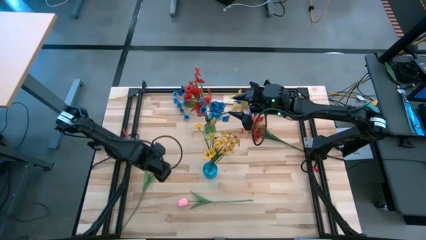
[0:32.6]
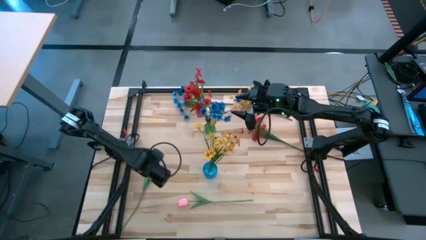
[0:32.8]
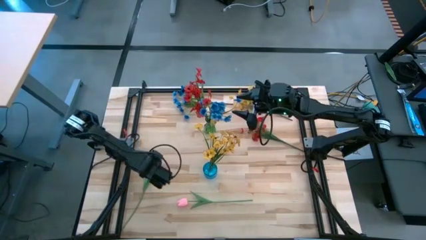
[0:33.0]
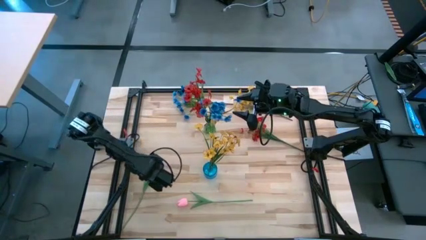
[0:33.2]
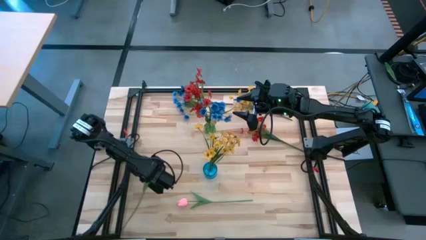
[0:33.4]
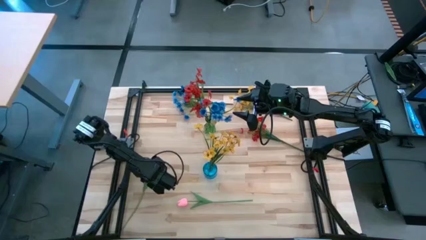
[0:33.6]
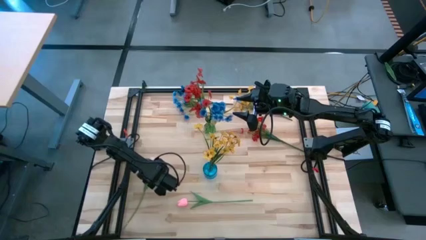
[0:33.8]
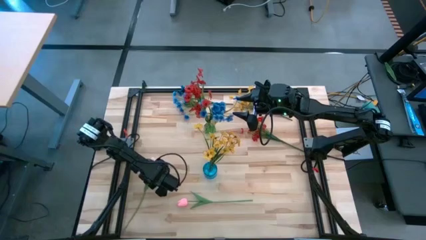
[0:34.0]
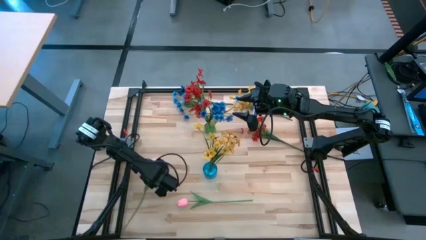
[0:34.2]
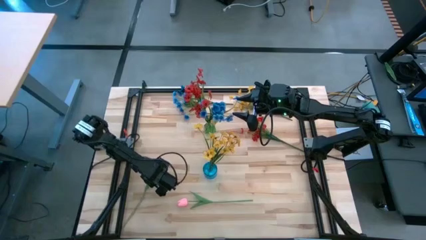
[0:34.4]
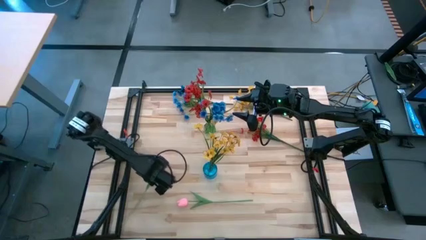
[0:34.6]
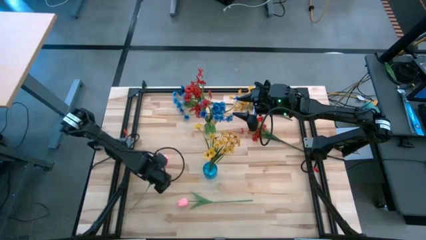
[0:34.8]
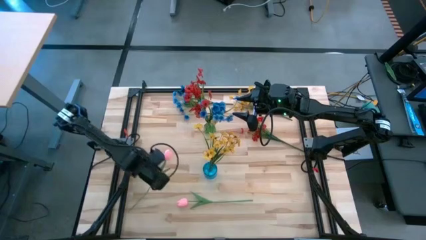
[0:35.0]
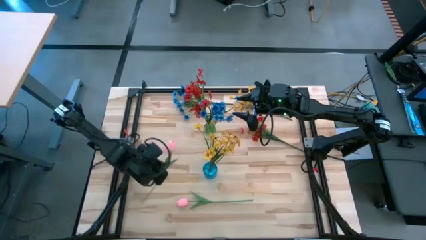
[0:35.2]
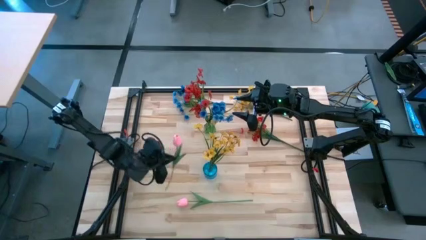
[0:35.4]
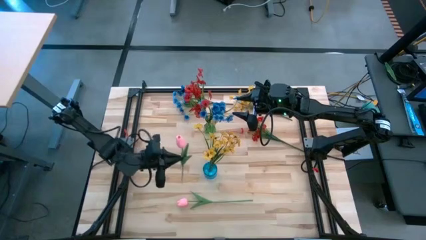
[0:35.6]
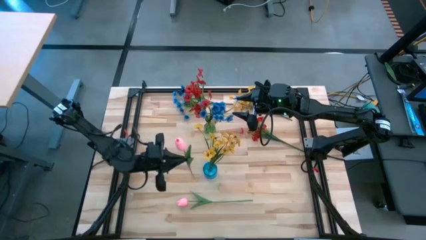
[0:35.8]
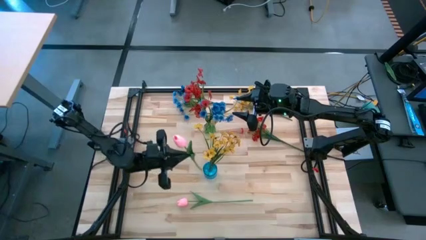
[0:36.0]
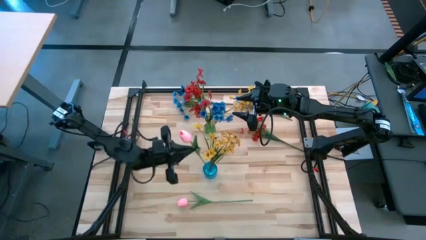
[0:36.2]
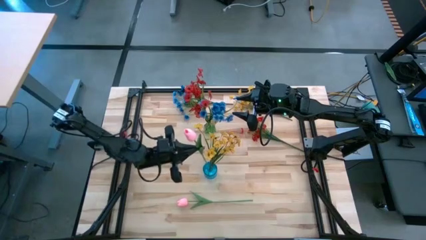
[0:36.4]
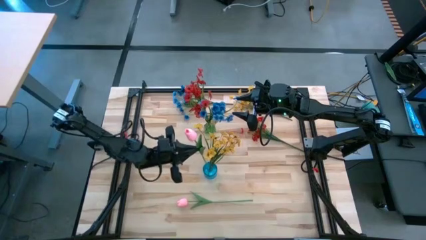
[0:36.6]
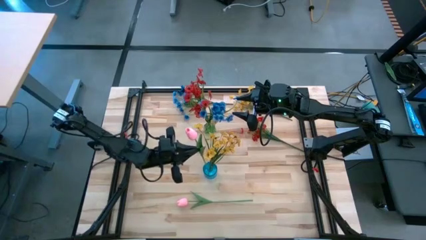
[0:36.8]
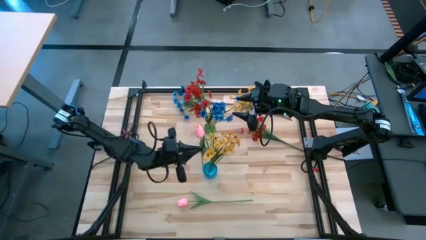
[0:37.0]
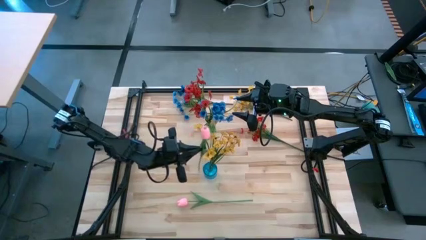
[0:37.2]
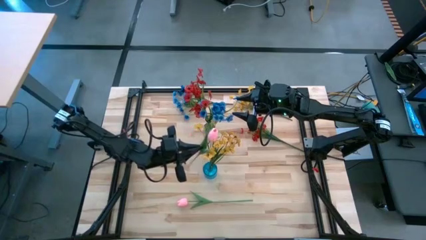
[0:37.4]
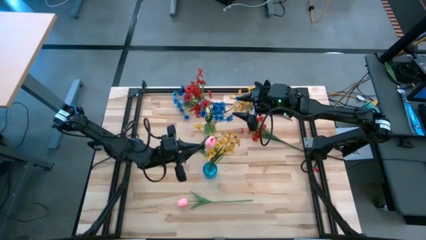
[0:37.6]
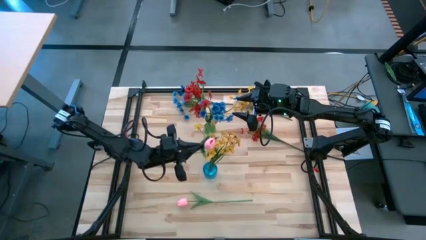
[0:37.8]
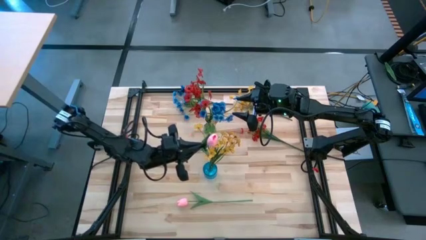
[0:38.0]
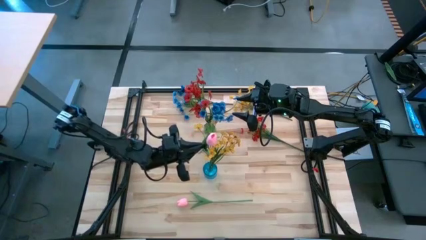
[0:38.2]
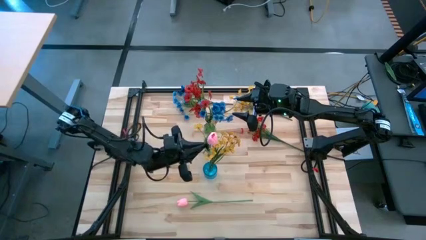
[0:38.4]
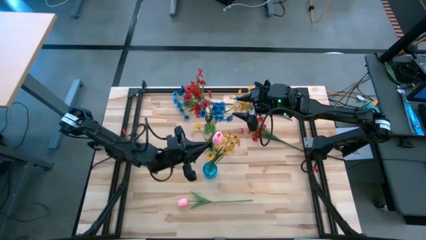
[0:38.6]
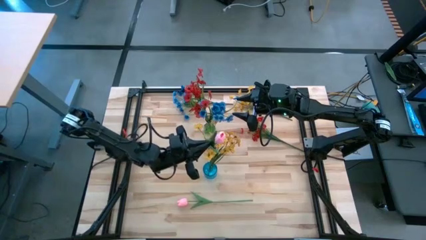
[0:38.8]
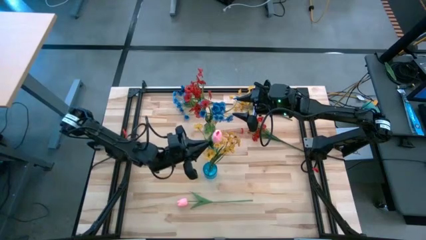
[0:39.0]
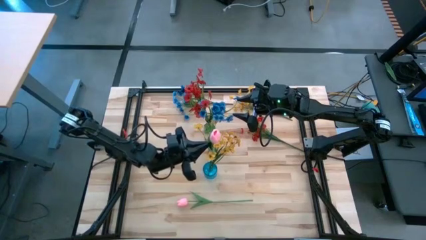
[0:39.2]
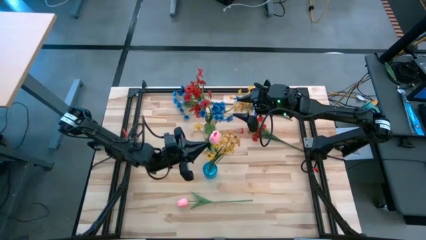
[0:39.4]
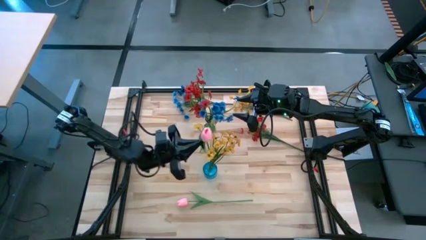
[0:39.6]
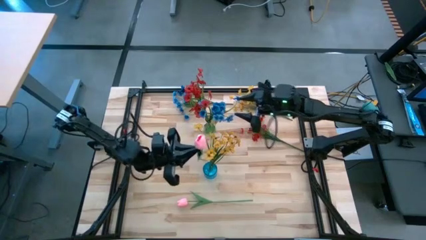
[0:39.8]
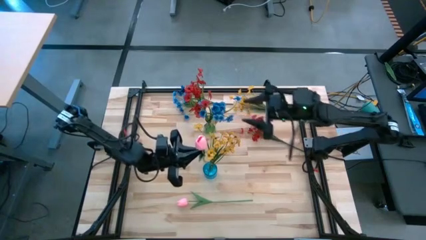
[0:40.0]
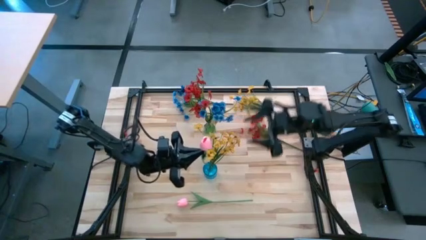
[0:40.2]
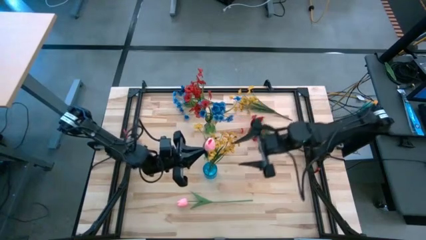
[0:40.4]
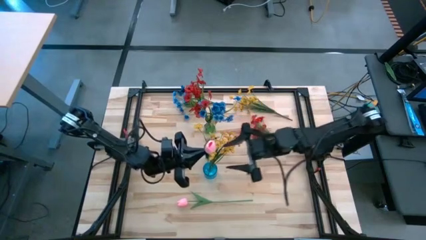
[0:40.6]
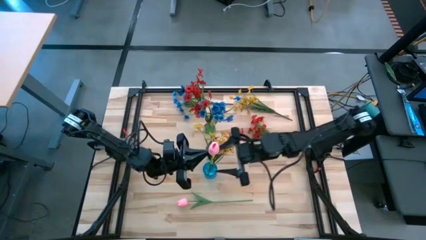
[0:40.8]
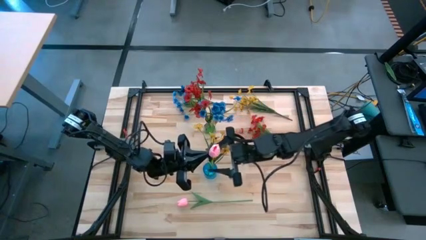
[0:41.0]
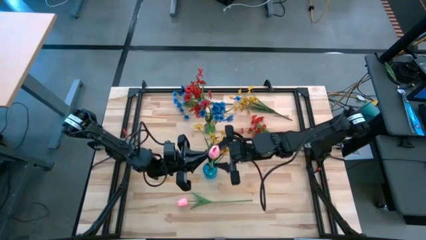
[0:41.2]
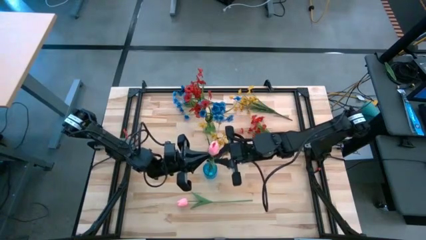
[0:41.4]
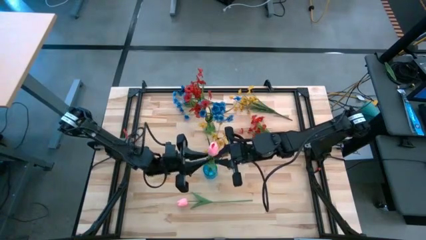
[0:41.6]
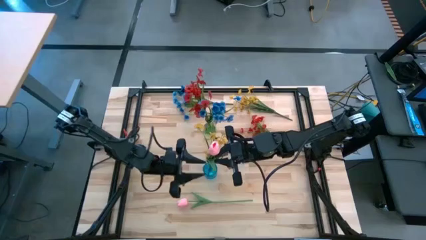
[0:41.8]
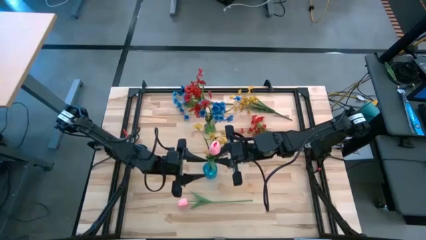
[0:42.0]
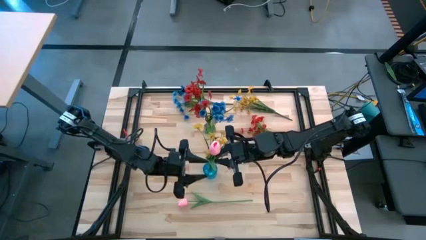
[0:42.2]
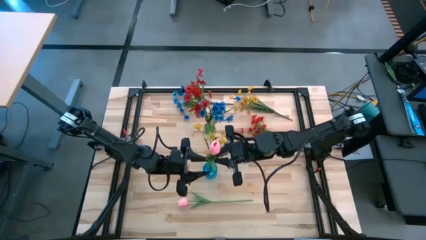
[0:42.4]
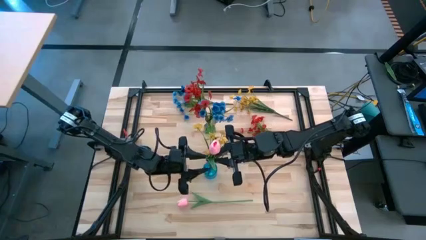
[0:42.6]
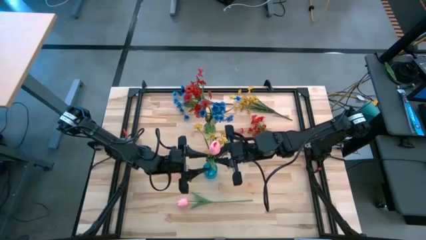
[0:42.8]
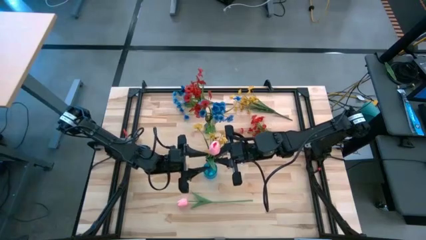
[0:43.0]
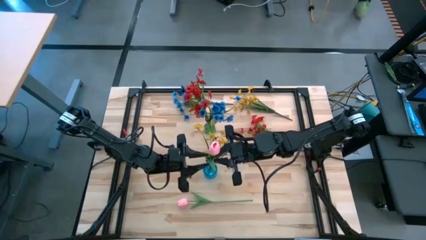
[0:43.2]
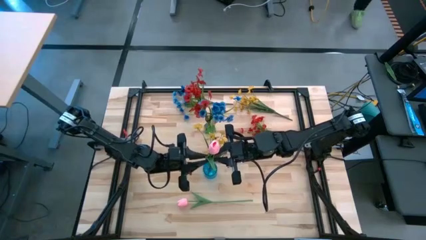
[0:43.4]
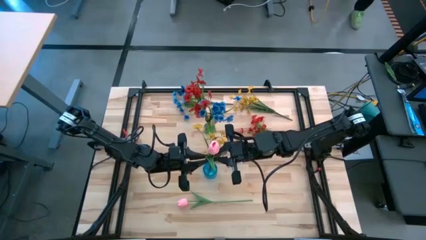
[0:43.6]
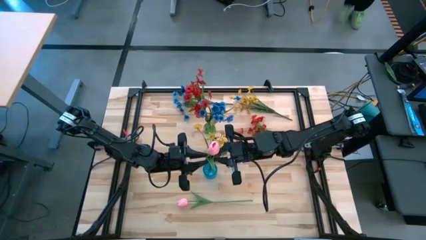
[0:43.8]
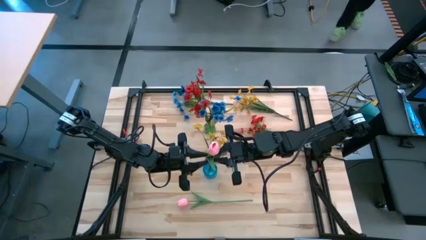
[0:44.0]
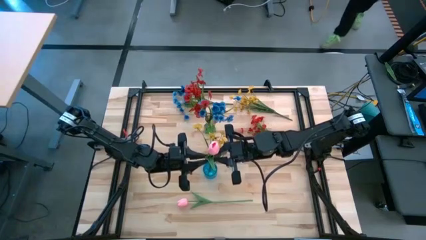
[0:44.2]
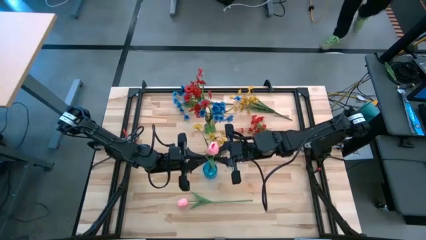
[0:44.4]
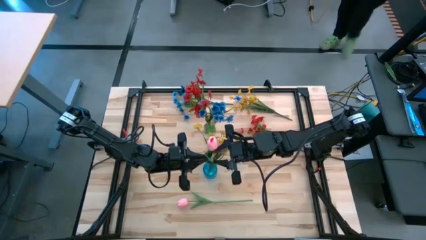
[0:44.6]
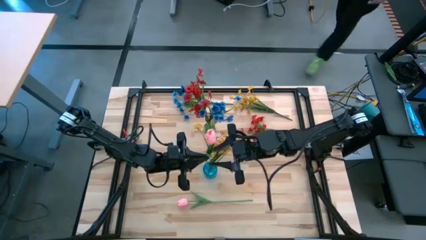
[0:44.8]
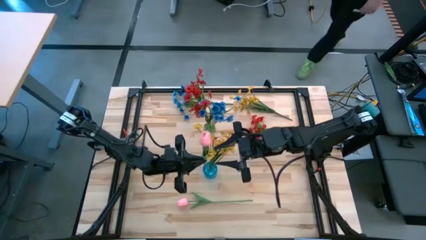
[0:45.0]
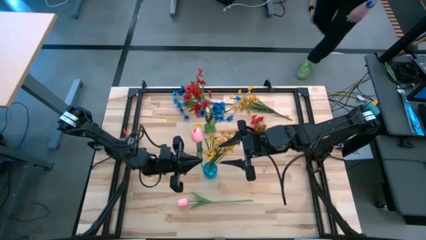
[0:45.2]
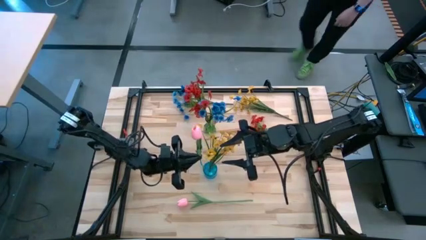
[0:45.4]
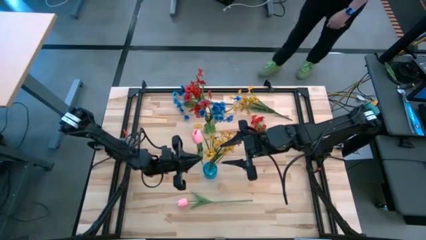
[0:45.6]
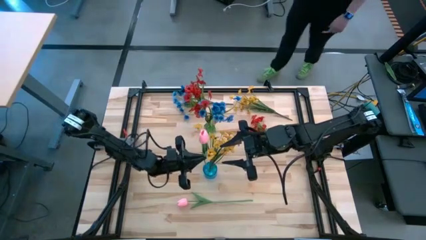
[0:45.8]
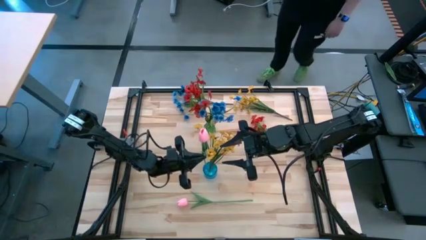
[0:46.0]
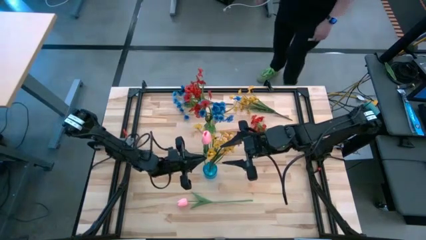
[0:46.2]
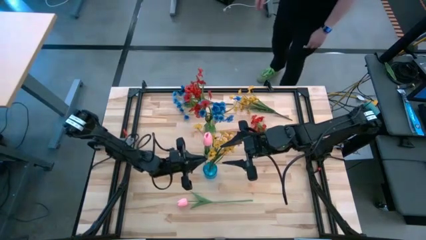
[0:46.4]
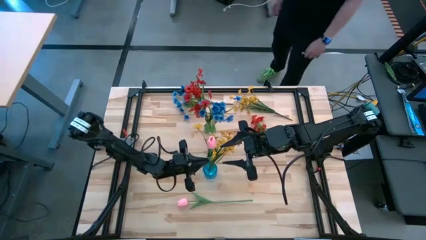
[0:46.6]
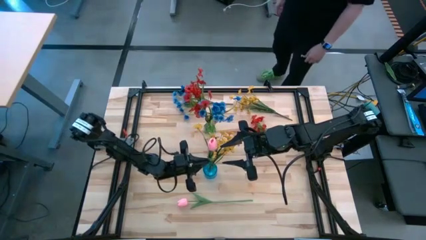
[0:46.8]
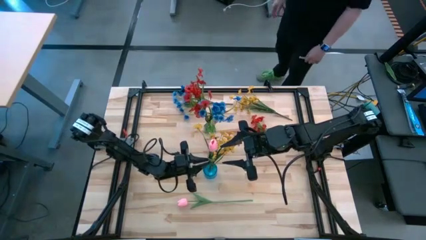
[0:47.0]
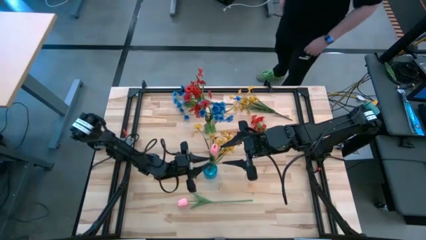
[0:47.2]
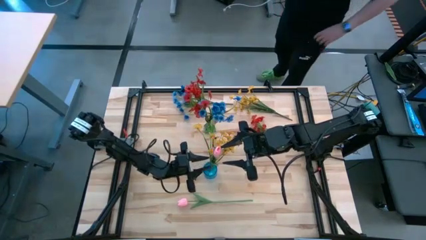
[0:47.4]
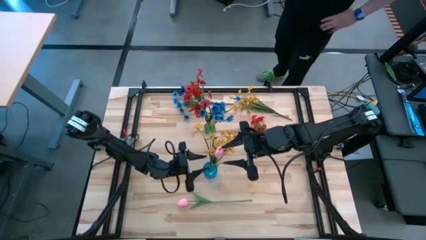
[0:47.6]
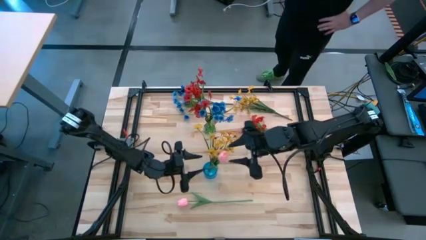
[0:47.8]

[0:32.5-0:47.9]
Task: Sort flowers into vase by color
Put the left pink flower into the blue vase
